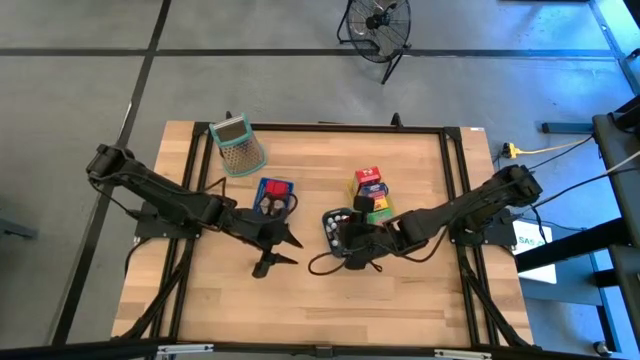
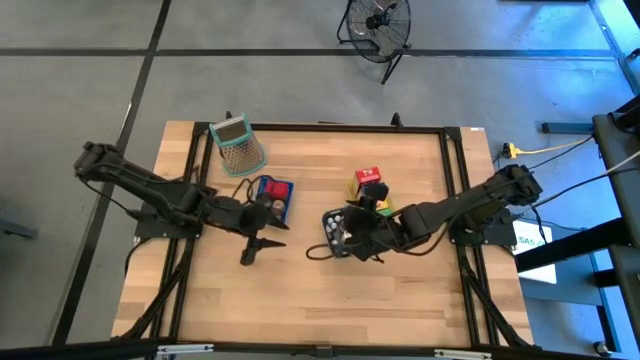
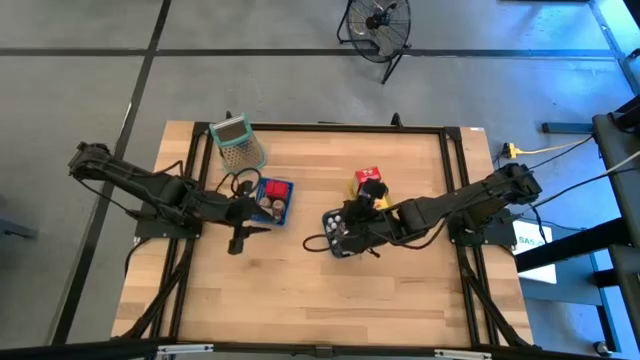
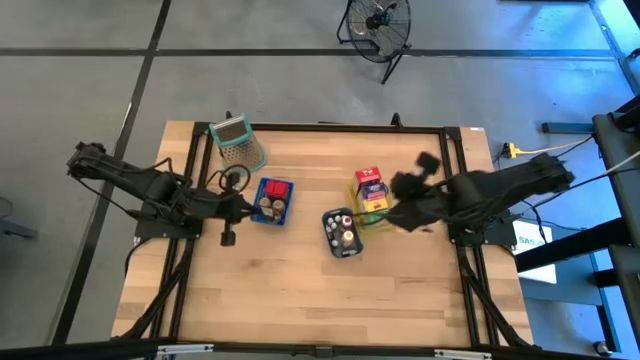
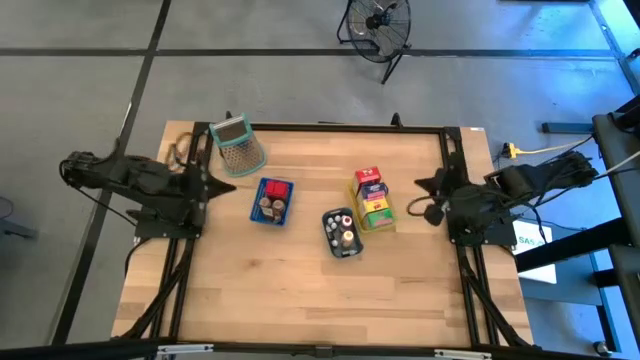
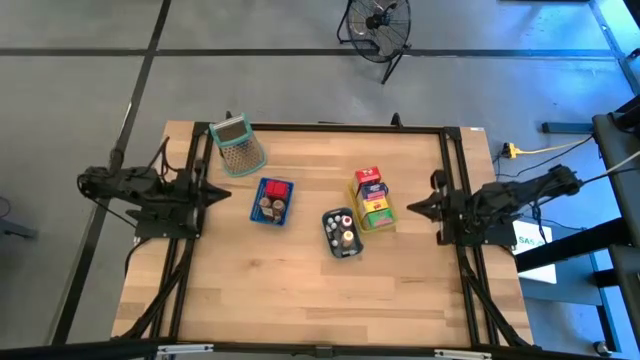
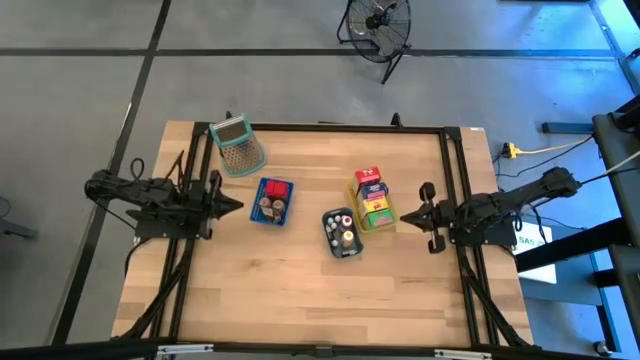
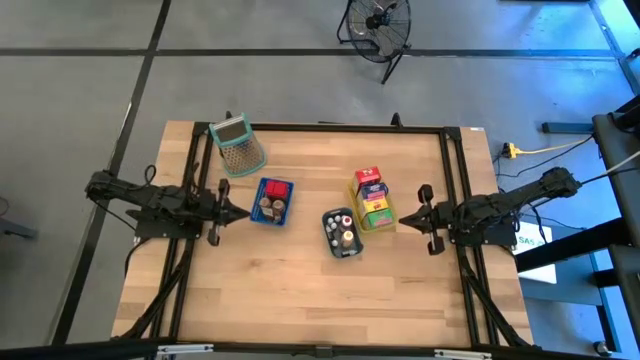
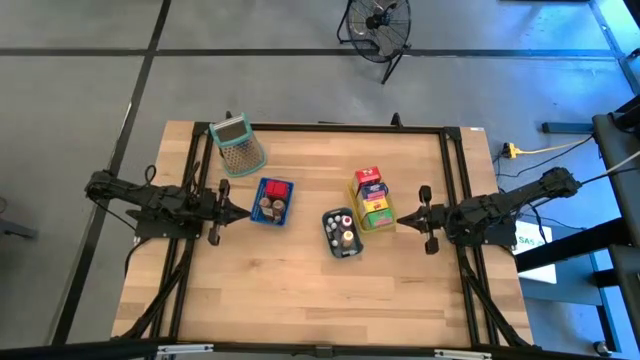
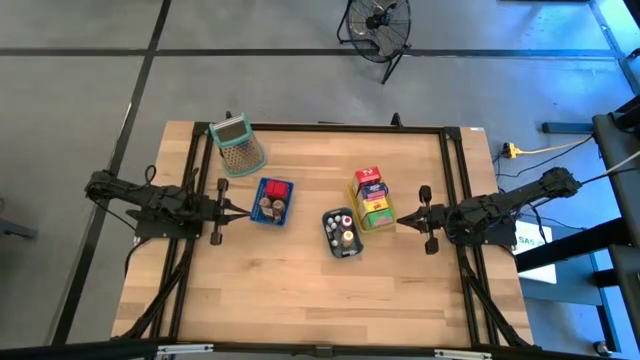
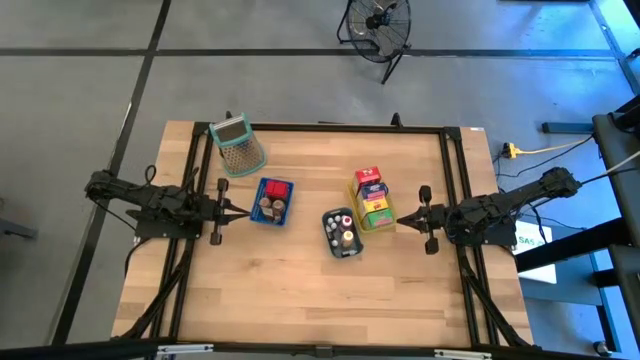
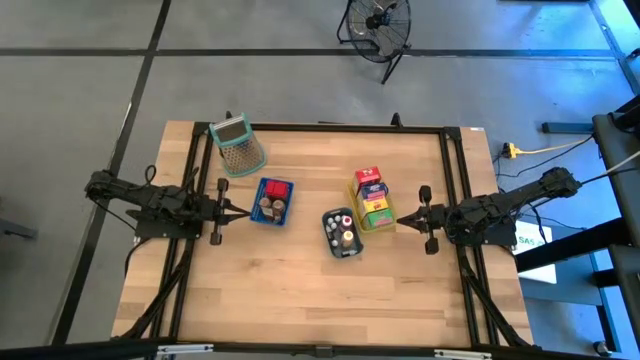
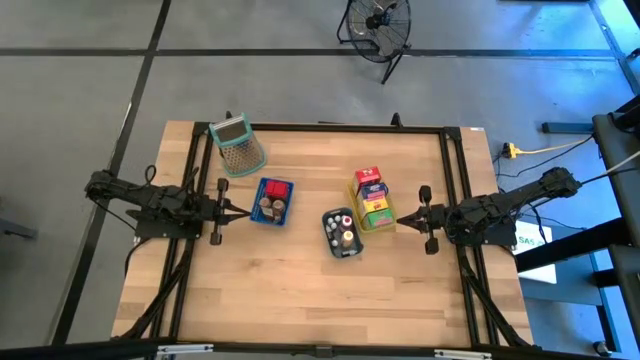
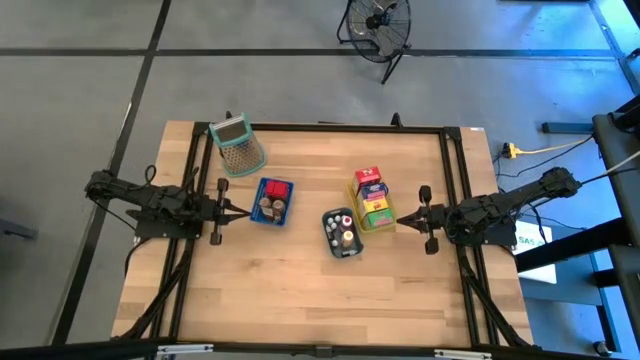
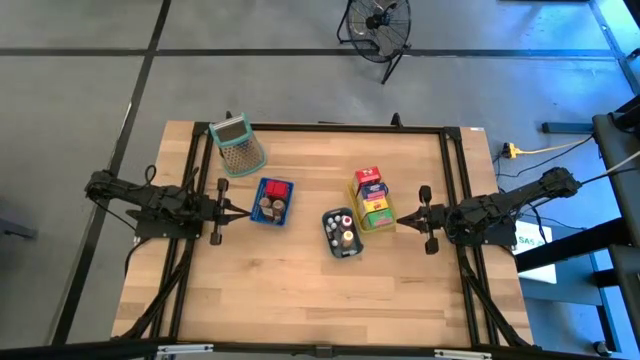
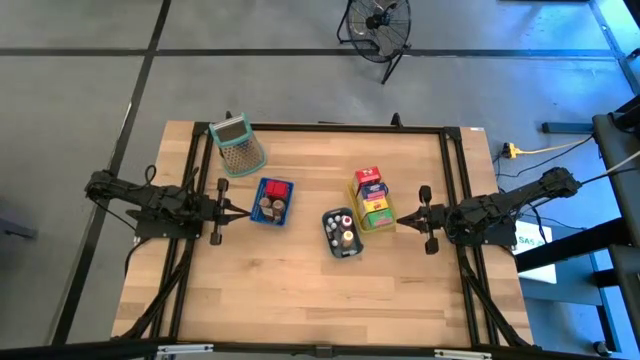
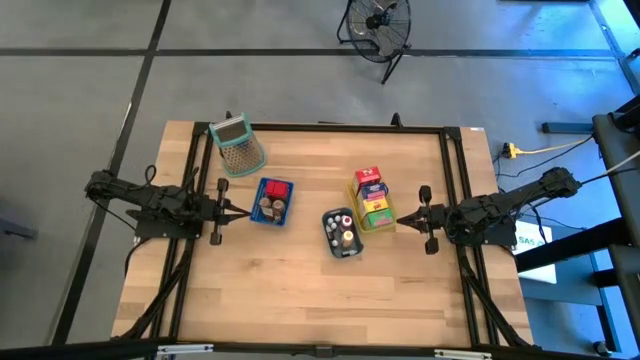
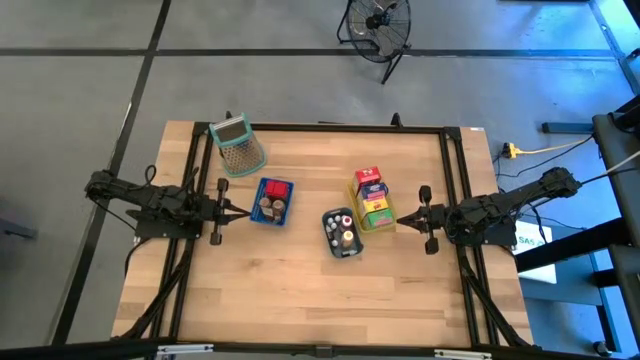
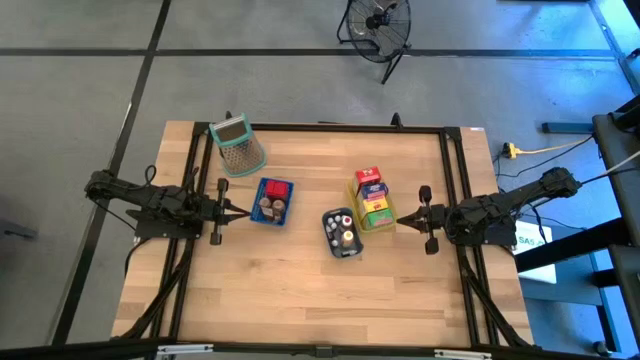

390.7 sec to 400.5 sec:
Task: Pick & Place Kitchen Items
Return to Home Position

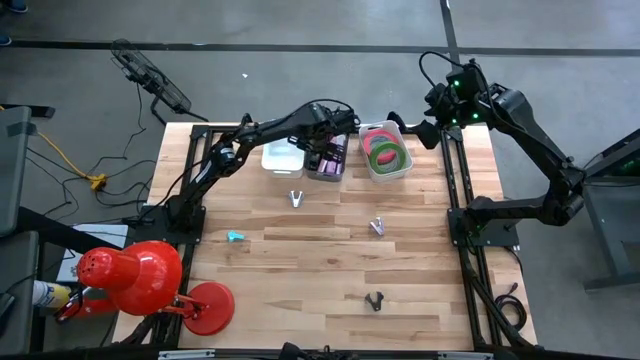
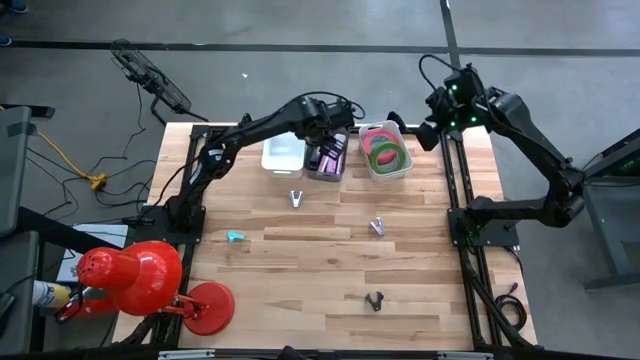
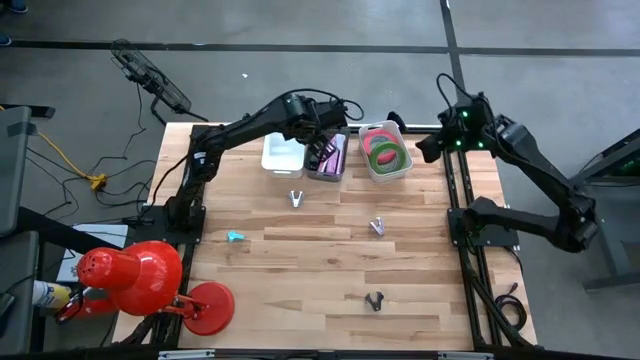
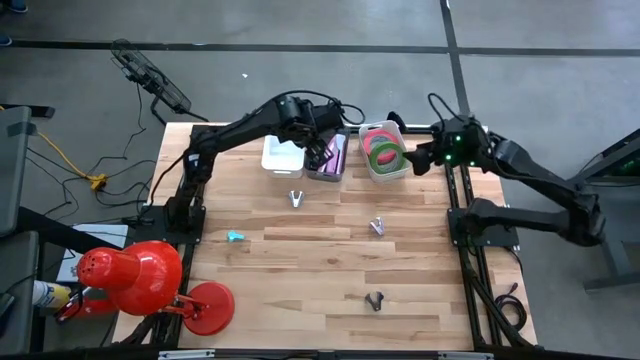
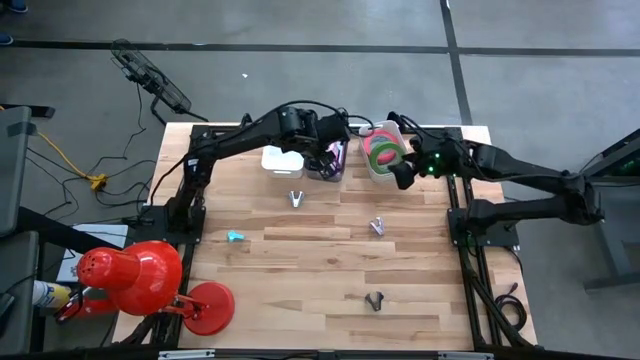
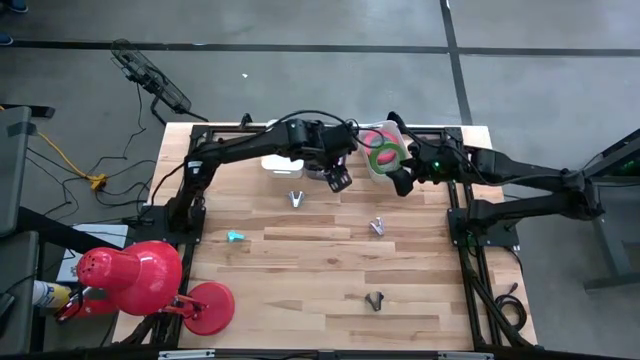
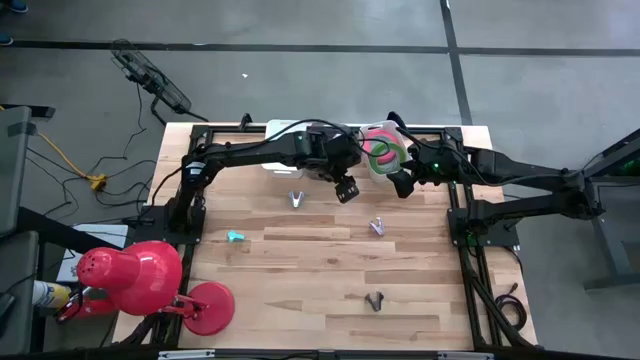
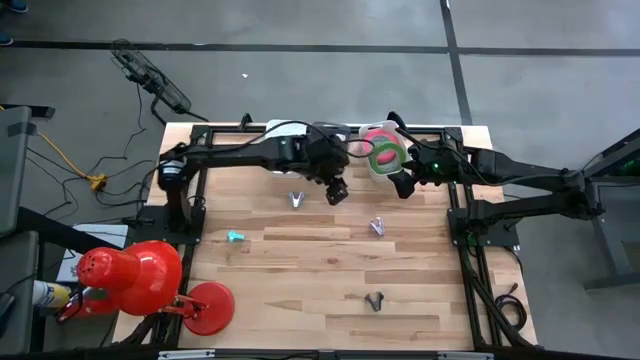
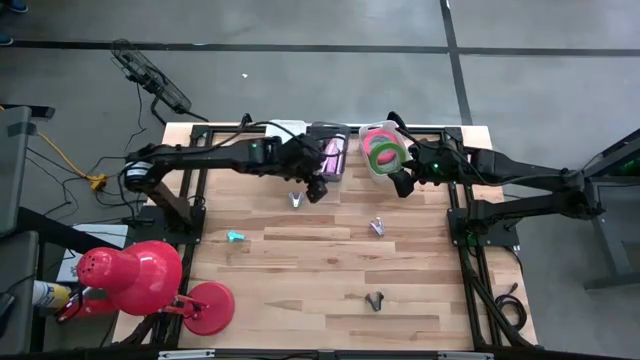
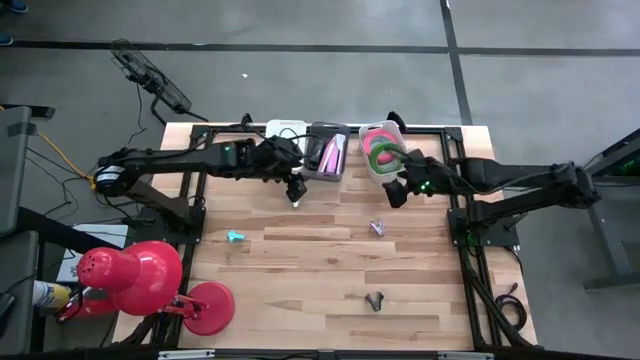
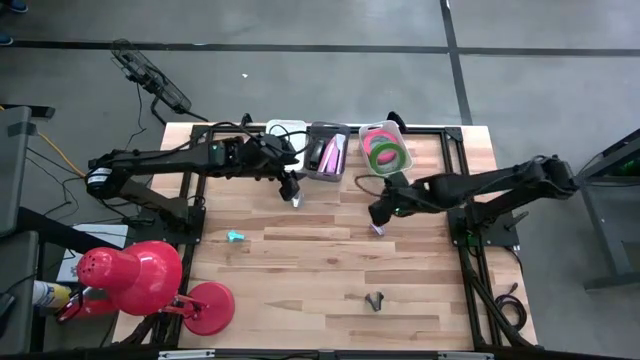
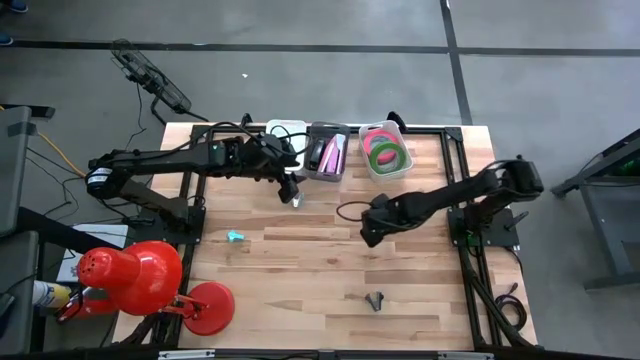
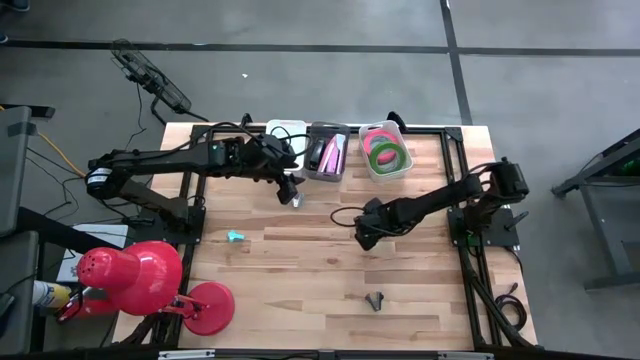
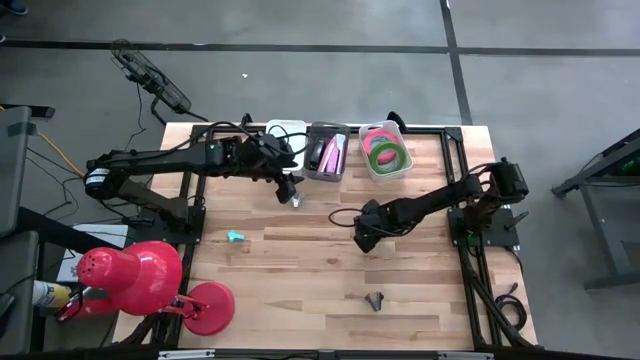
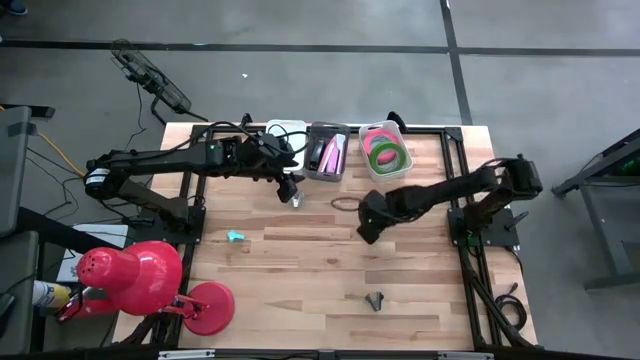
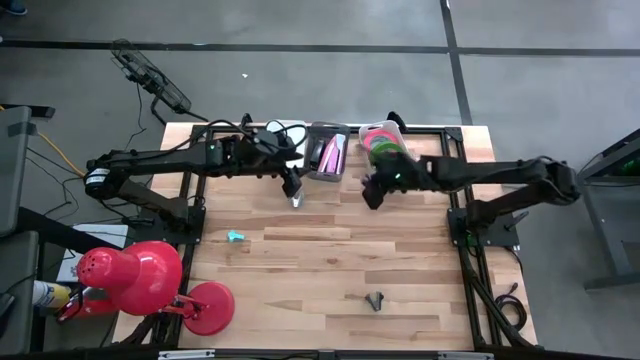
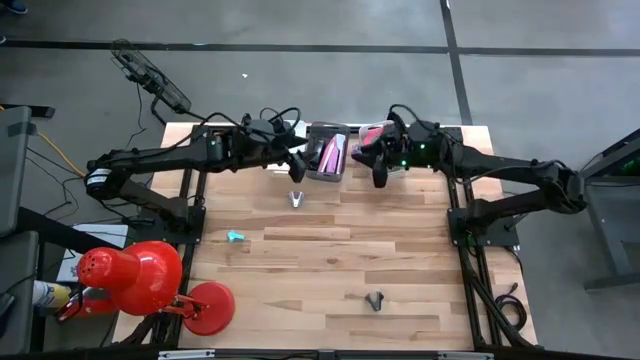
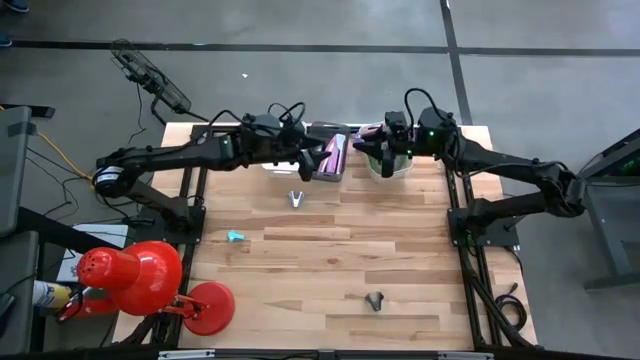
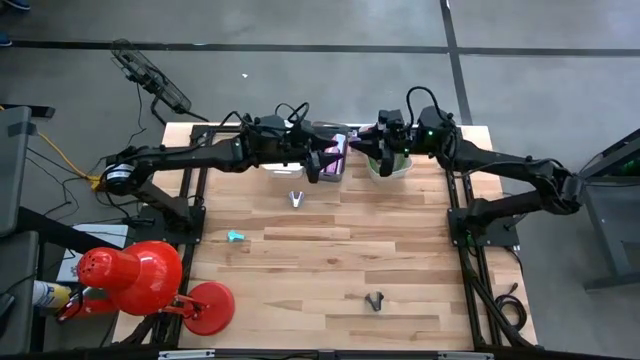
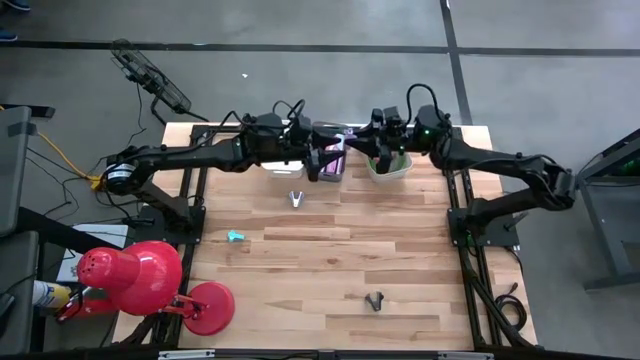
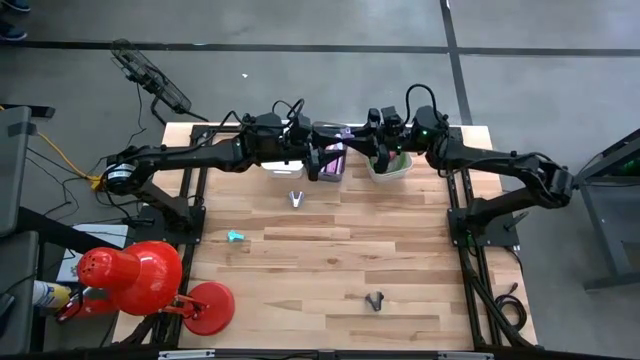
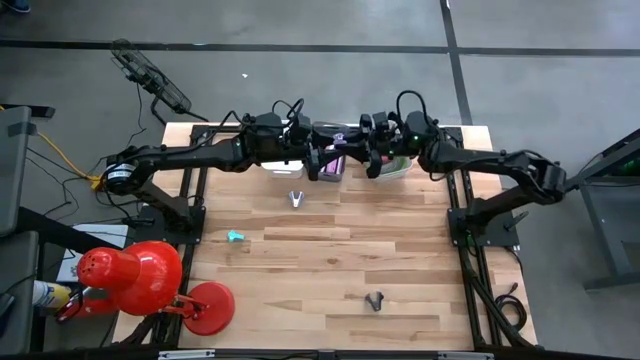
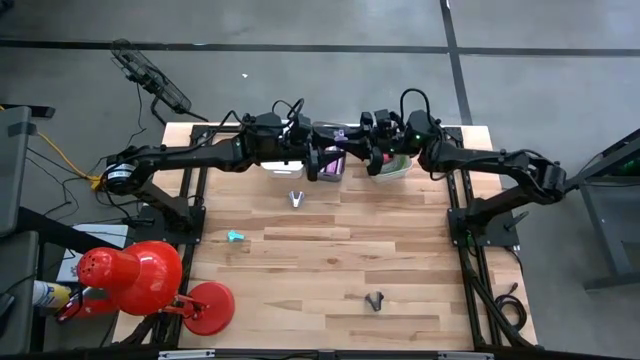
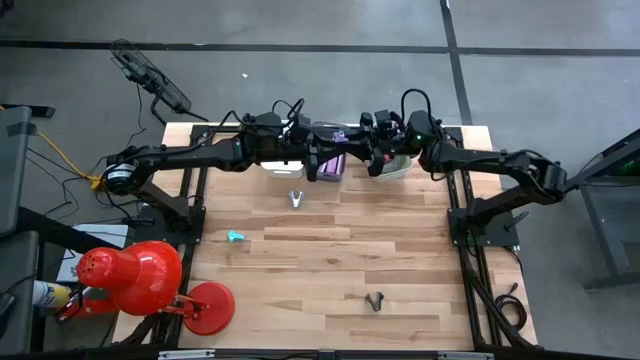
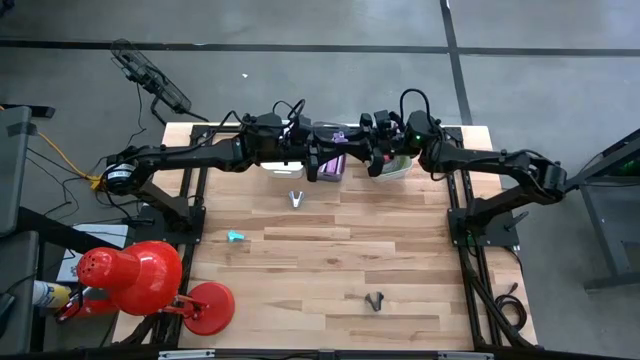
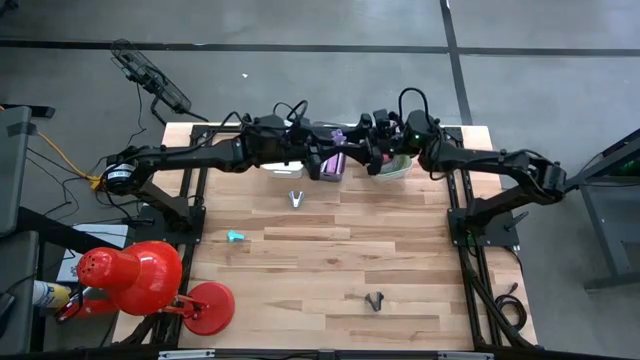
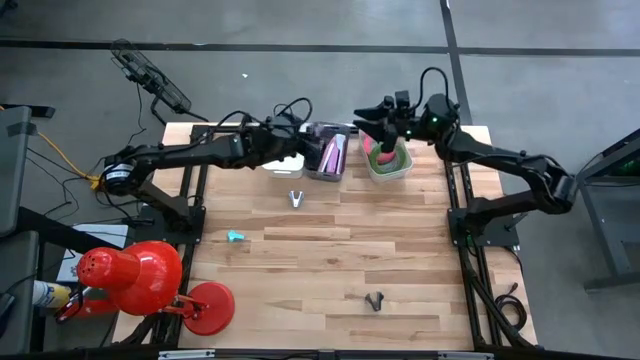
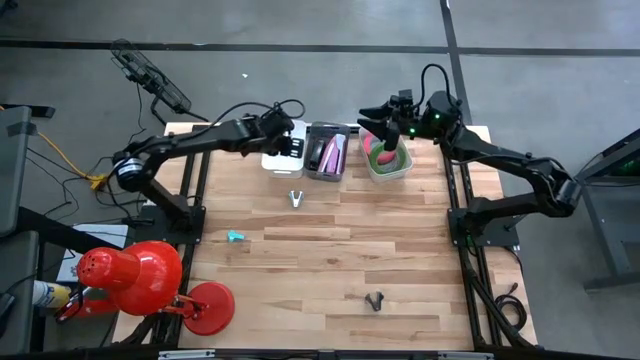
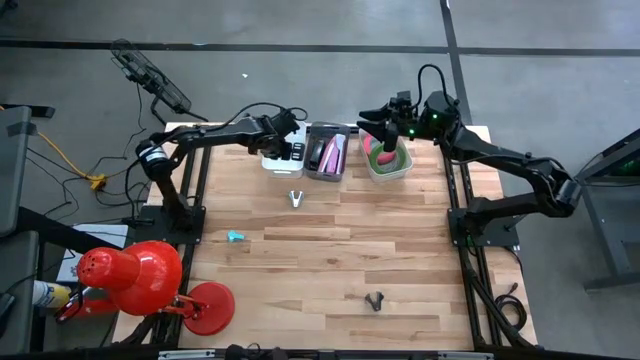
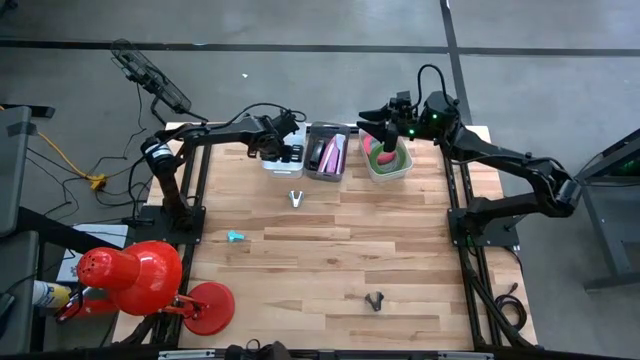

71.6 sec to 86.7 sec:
Task: Pick and place Stapler, Stapler remover, tape
Put the purple staple remover into the left white bin
